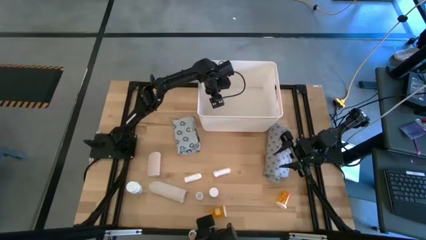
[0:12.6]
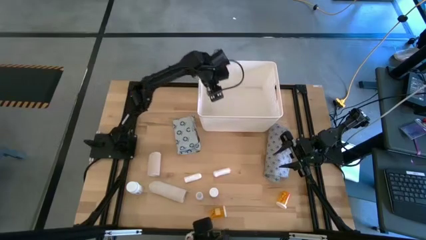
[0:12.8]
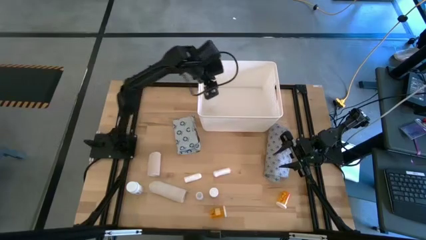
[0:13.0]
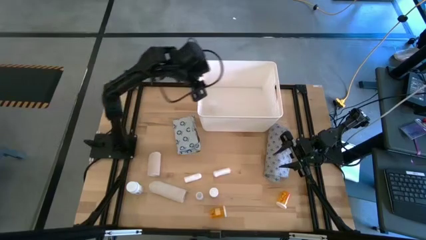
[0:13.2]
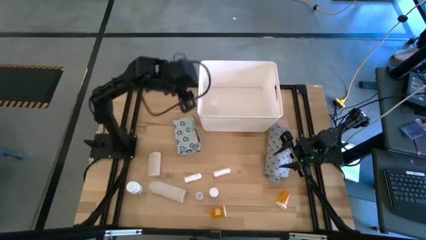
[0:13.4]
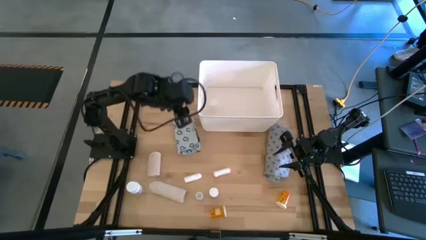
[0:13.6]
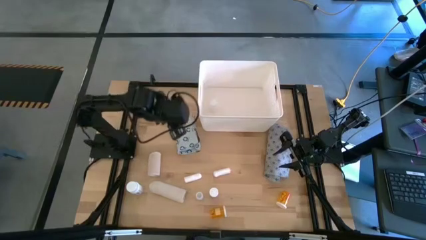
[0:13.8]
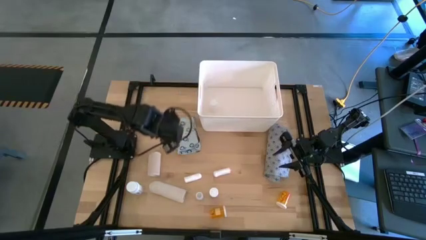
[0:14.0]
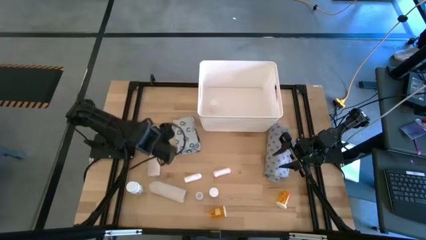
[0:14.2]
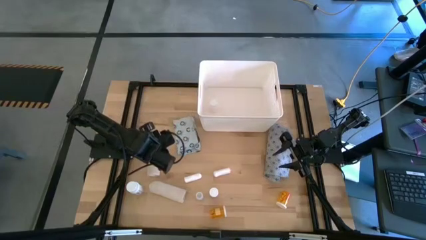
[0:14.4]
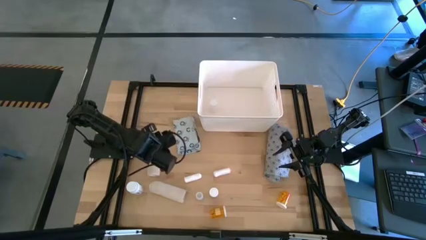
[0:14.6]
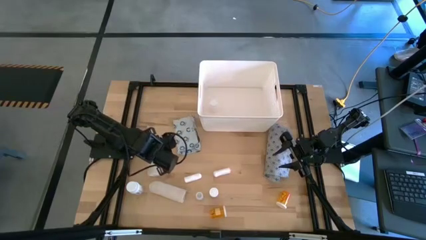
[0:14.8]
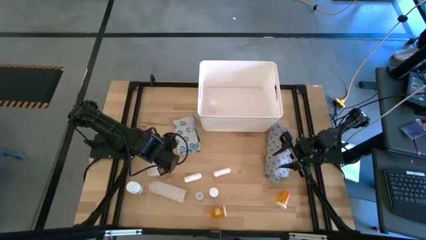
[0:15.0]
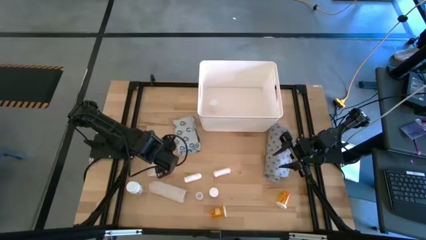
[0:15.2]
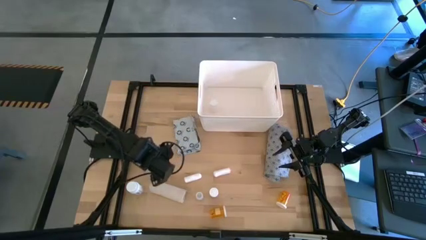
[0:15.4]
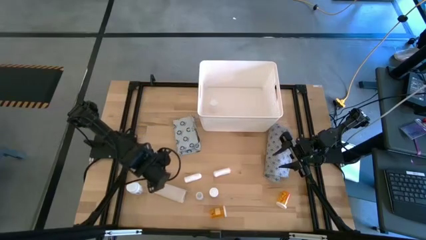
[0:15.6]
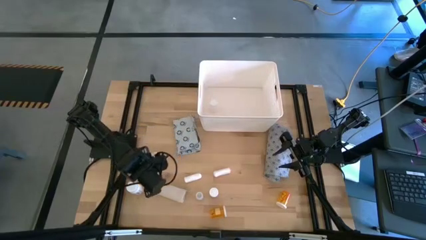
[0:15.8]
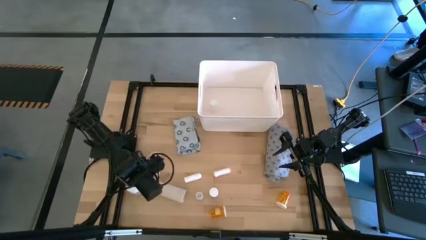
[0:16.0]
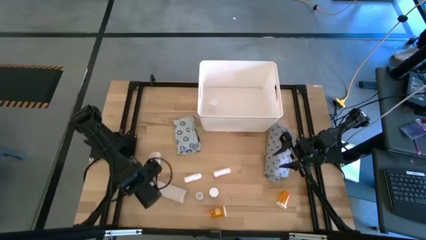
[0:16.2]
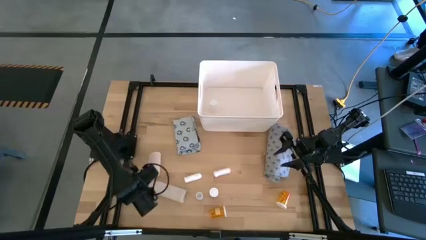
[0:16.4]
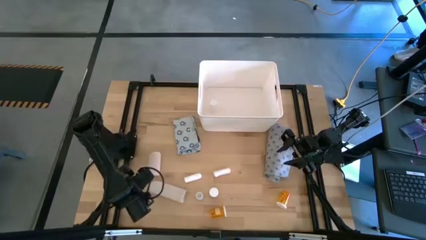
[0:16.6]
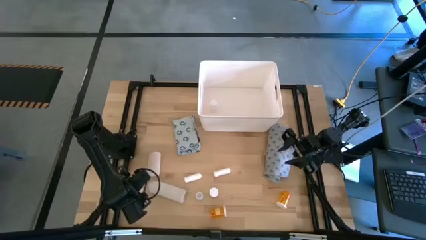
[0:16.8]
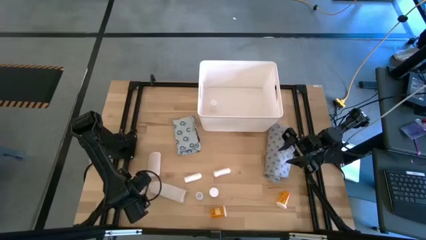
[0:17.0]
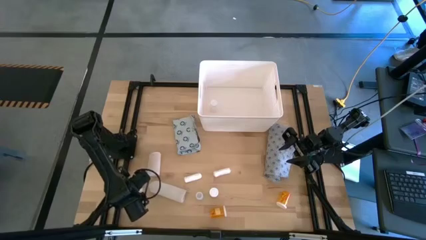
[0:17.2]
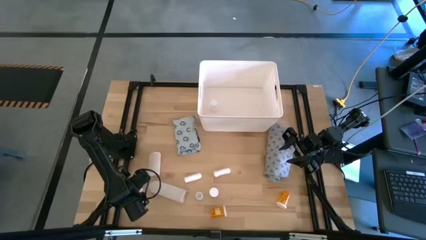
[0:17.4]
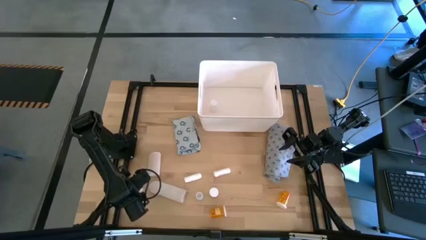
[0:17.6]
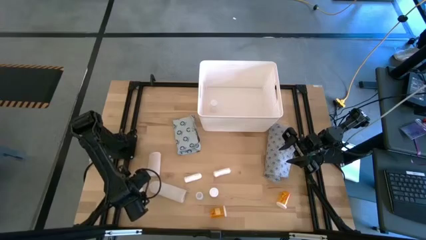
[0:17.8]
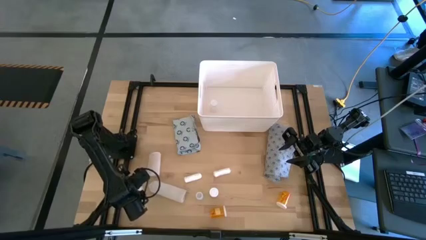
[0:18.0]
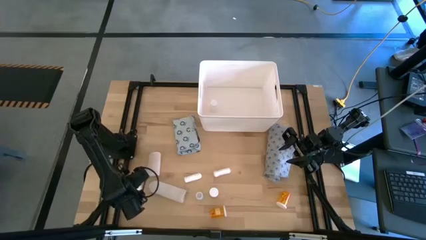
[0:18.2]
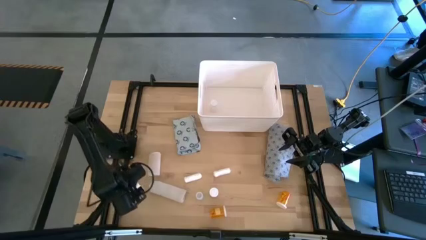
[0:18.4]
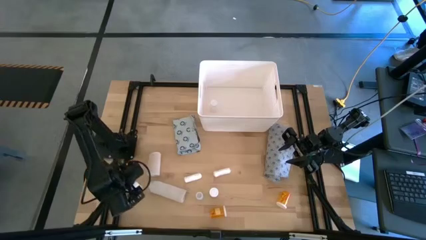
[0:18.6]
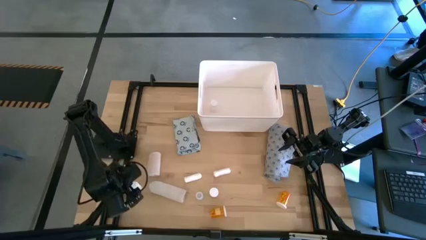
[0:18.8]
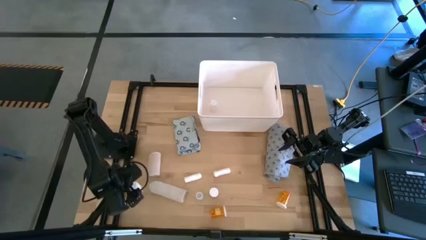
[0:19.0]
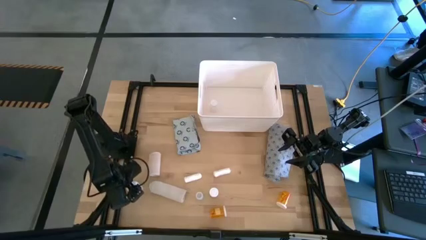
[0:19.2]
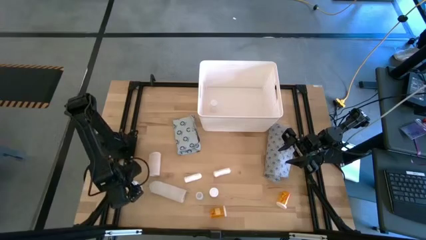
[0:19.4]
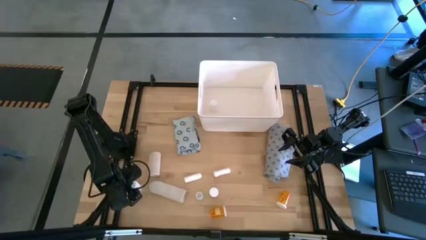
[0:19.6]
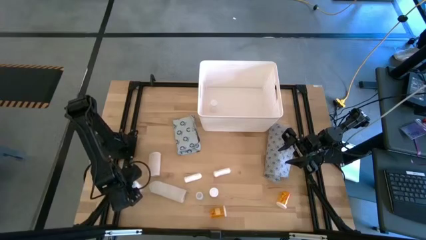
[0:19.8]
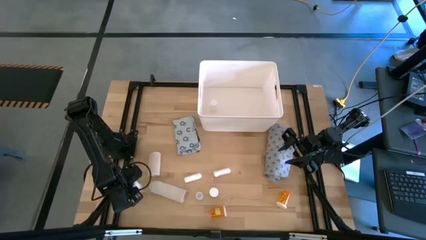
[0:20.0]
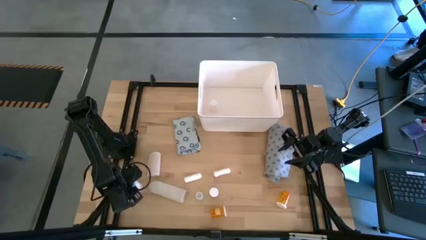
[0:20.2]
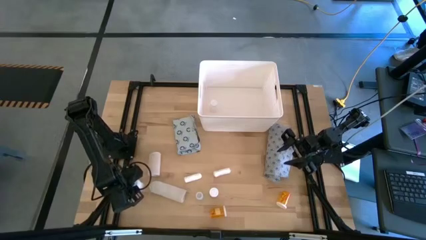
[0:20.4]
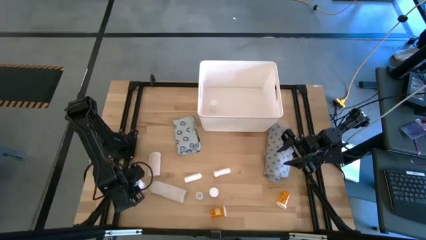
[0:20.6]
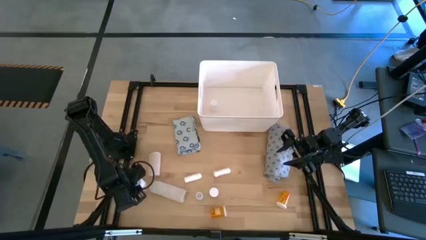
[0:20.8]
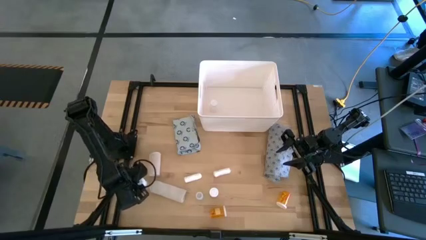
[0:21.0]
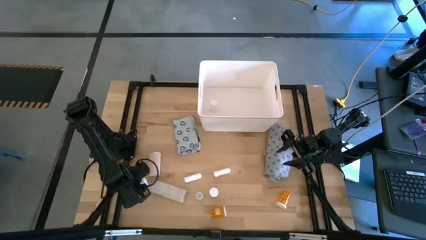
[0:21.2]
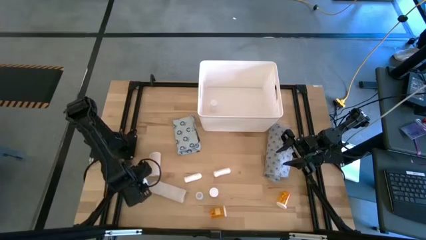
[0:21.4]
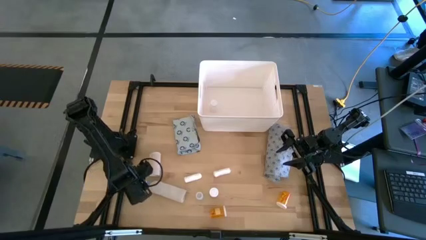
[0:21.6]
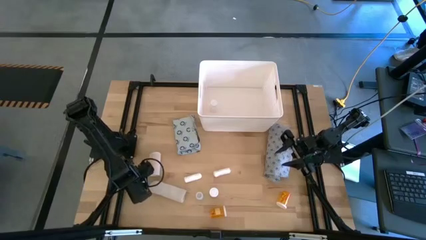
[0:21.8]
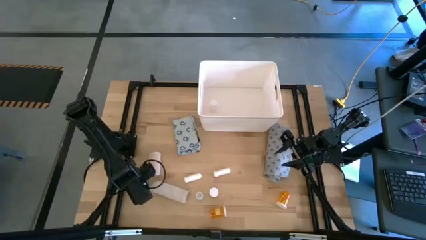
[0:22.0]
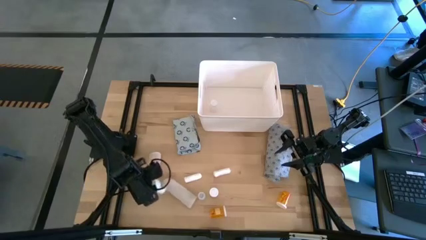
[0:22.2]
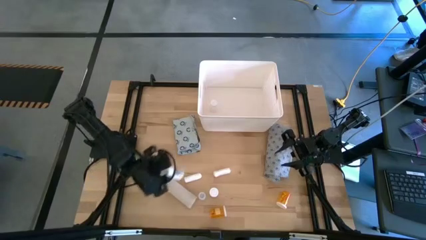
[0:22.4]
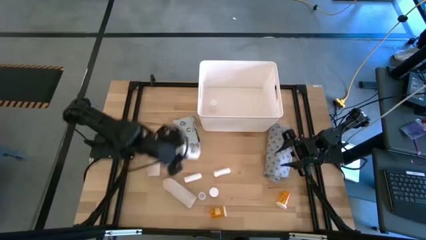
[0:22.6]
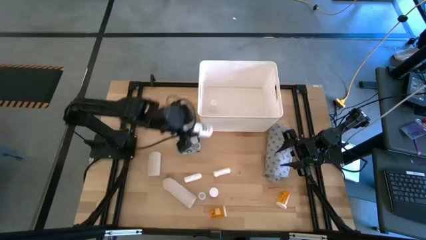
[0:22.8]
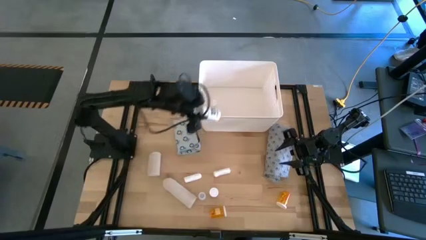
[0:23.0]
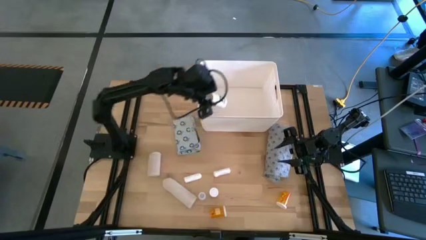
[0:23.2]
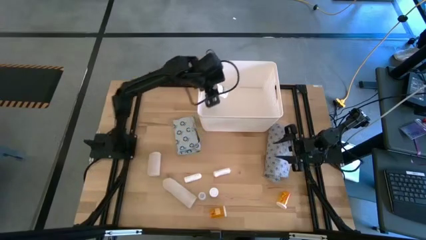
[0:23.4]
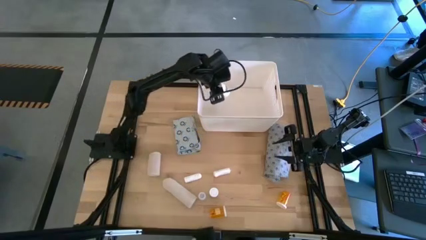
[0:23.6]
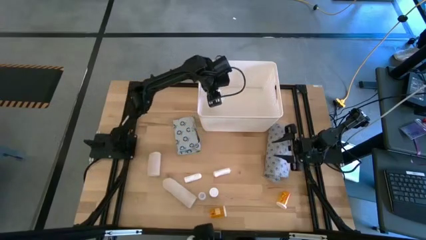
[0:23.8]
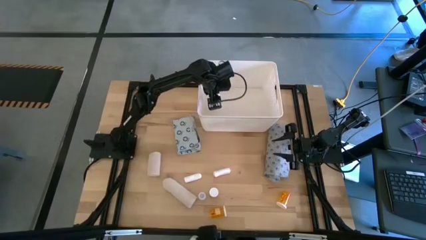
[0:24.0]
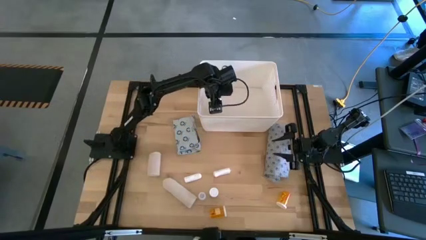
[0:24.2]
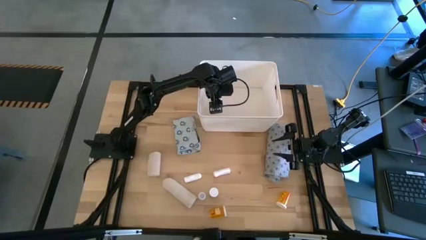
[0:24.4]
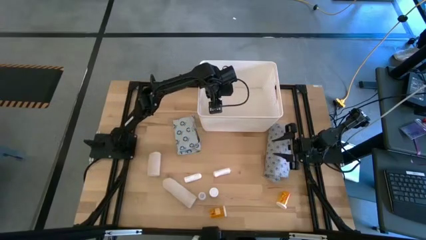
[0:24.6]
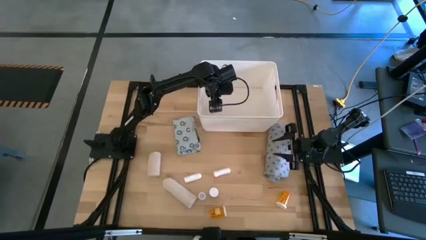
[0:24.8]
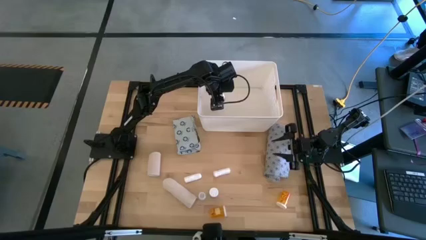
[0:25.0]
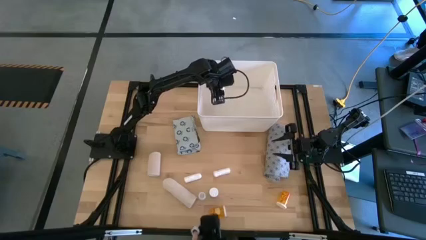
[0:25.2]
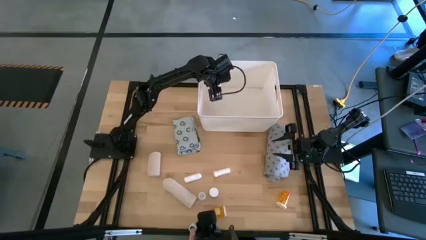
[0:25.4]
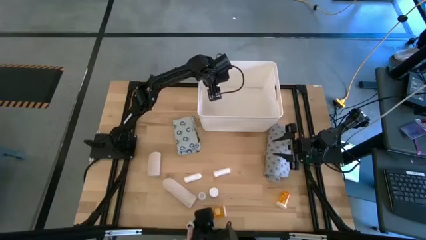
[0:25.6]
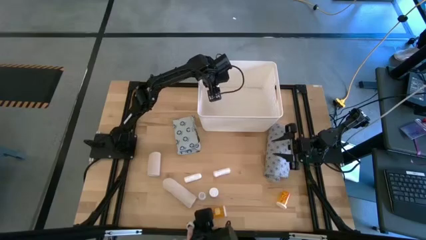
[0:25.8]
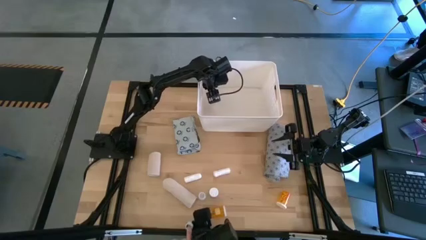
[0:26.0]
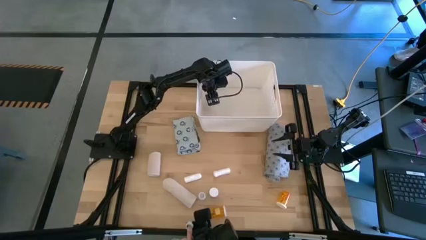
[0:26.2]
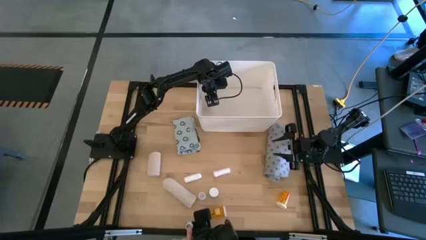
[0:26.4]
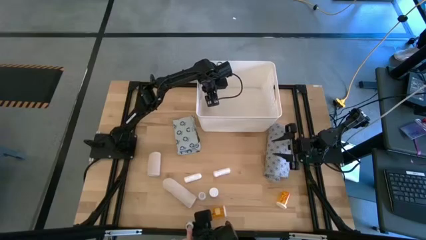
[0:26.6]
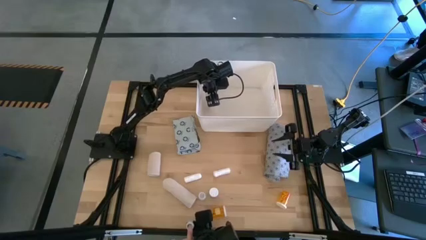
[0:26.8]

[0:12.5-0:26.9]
Task: Pick & place medical supplies in basket/bin
Put the white pill bottle into the white bin

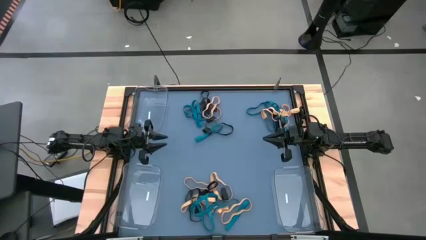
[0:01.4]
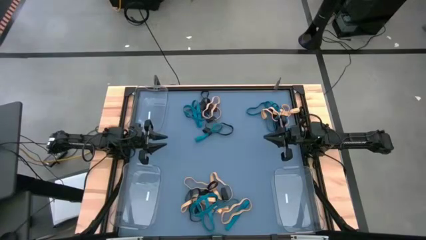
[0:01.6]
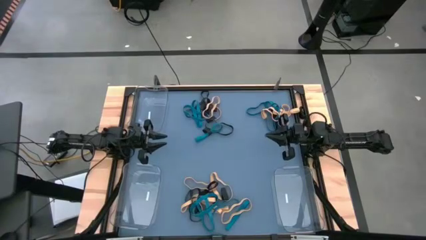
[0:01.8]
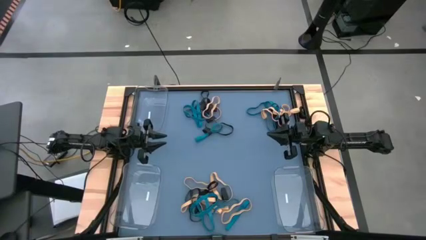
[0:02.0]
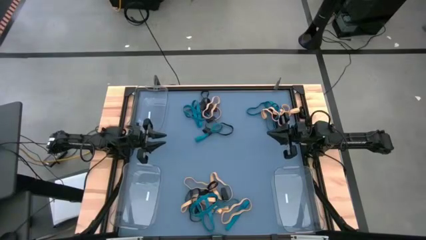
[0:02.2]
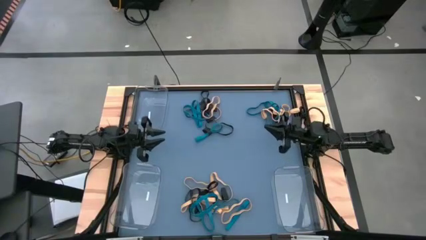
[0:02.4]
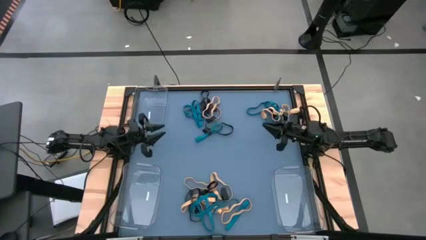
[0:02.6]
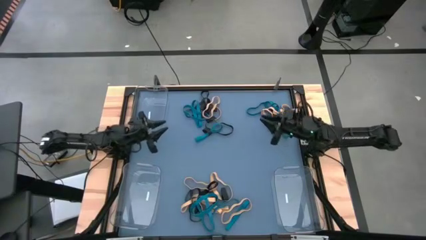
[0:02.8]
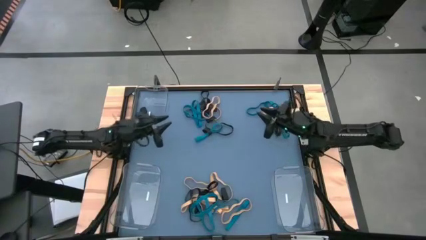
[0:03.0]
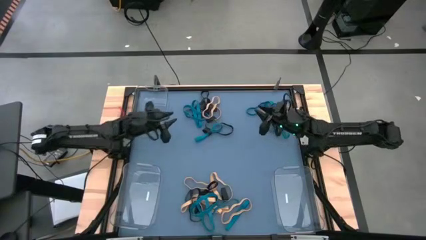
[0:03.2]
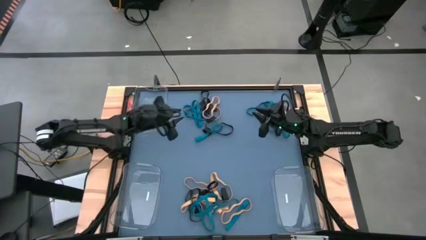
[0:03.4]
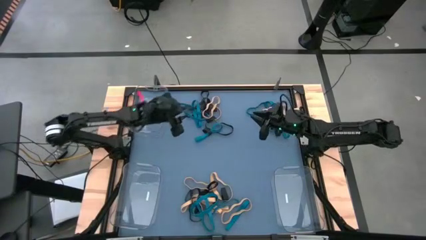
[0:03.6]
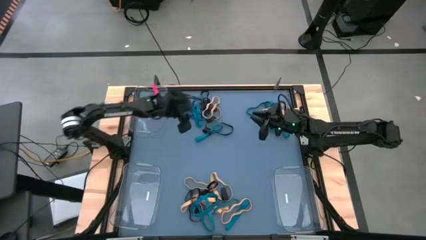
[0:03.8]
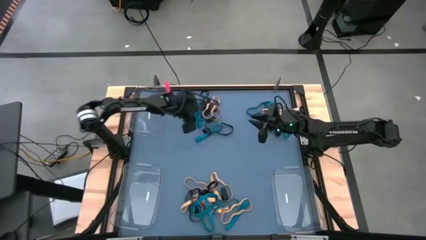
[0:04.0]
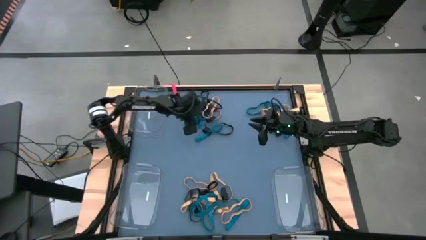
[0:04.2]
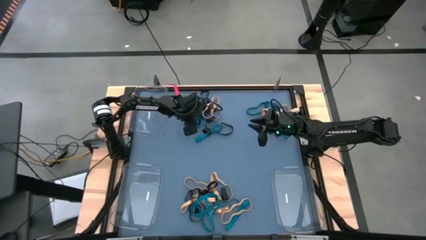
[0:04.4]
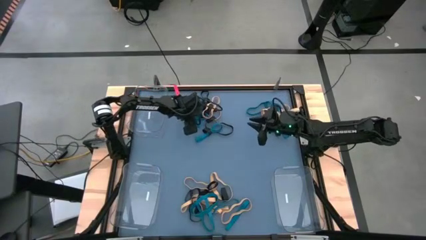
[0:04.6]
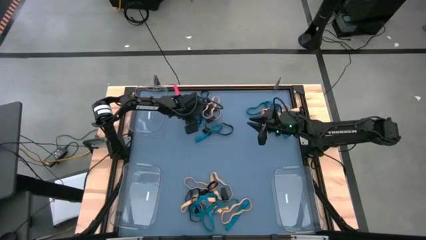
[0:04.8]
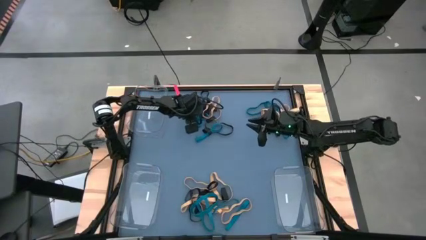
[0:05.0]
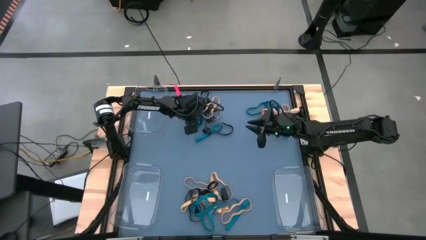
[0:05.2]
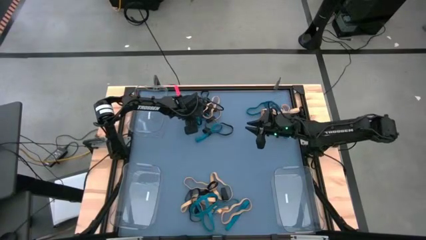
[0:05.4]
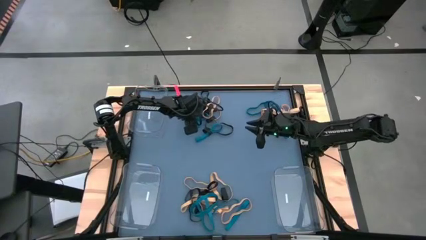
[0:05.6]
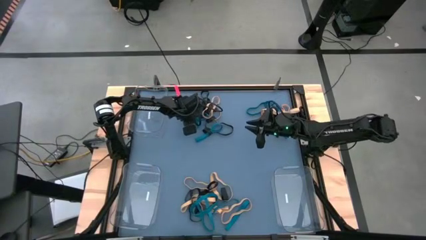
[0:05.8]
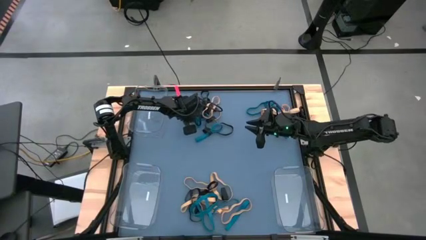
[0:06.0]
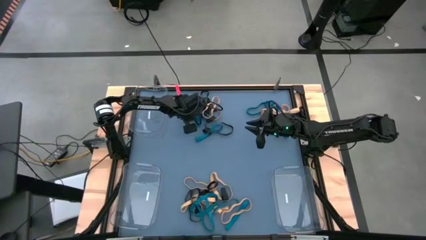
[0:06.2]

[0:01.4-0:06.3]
Task: Sort rubber bands into baskets
Put the blue rubber band into the top transparent bin
